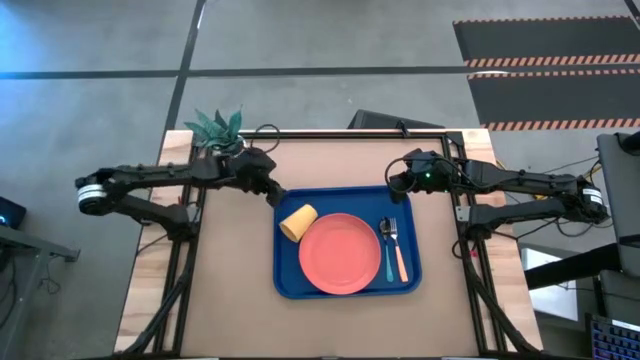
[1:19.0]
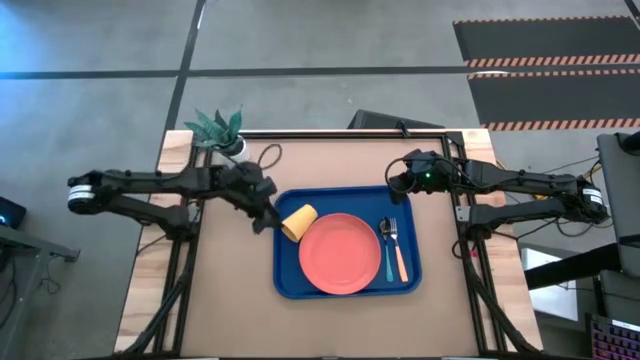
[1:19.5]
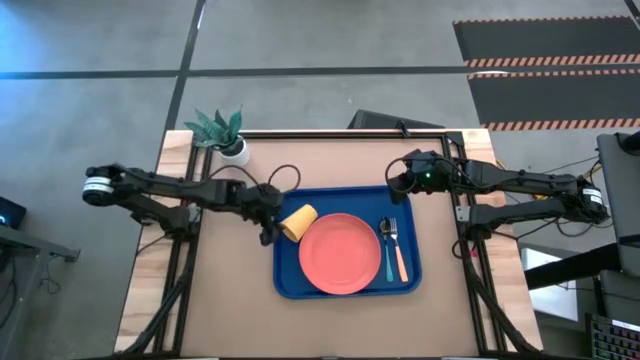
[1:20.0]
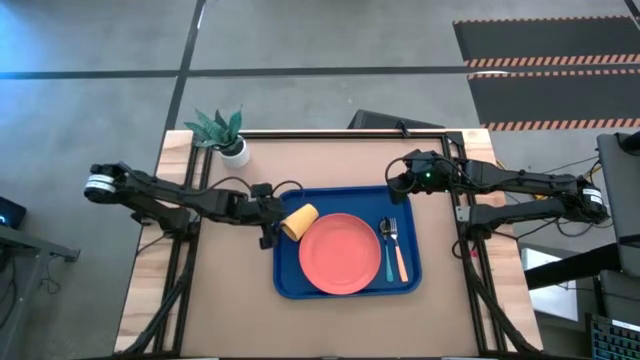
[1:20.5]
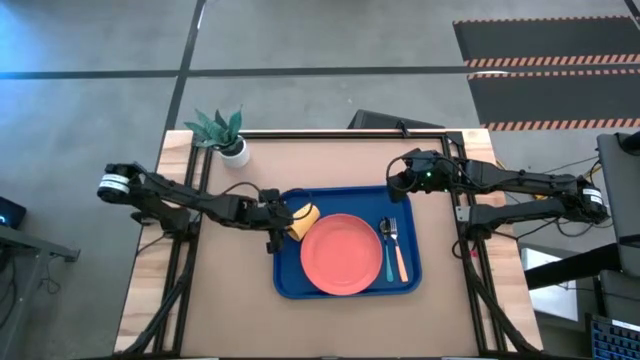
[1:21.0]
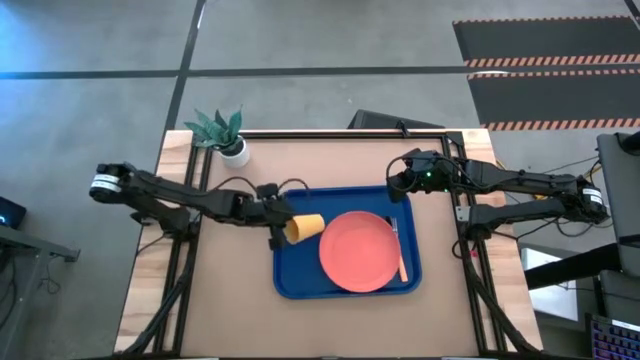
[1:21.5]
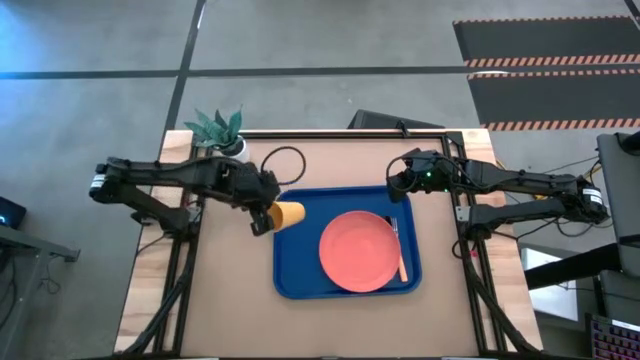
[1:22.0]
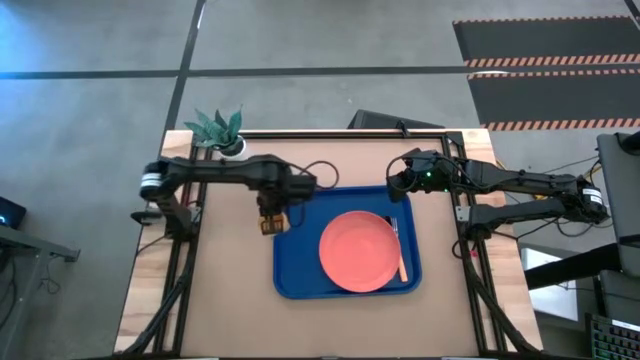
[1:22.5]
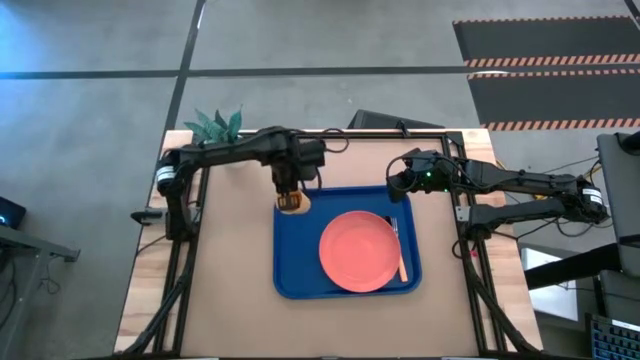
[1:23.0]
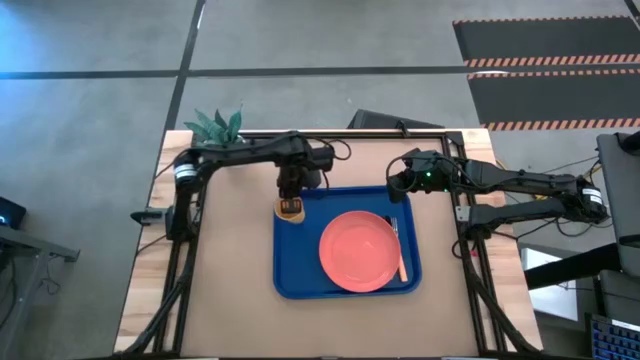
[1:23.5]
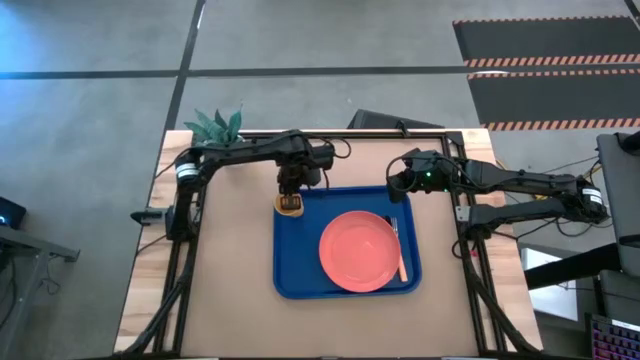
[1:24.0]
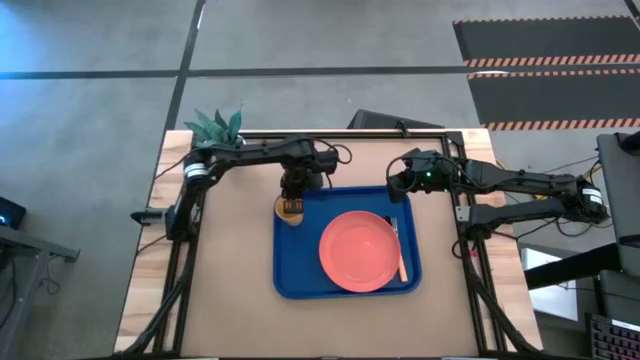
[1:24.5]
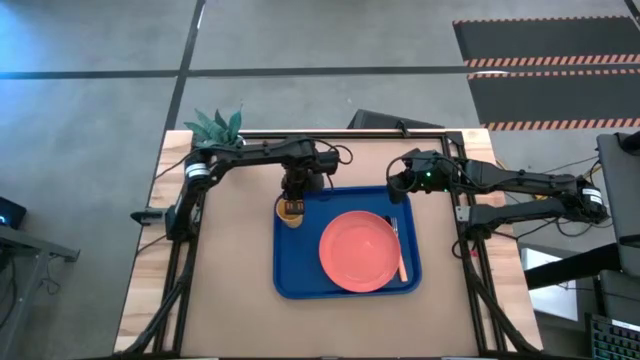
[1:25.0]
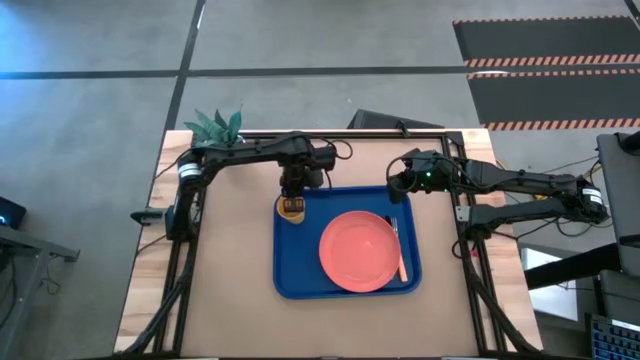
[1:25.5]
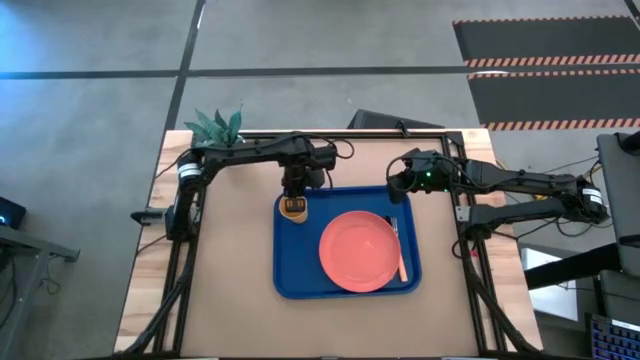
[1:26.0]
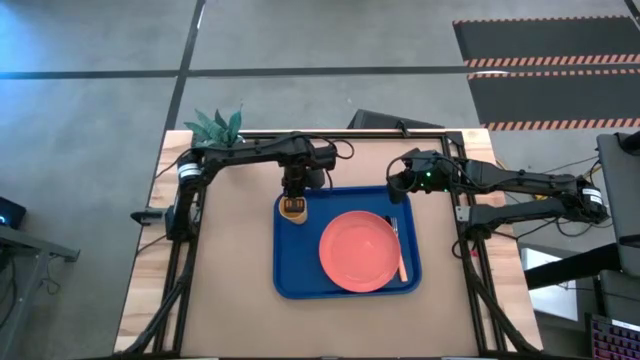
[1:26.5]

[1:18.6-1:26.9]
Task: Pick and place plate/cup/fork/spoon on tray
Adjust the yellow cup

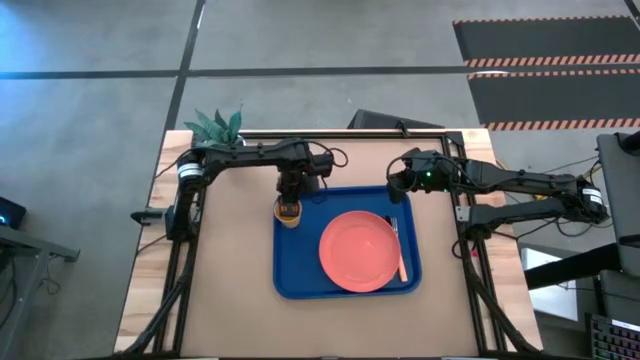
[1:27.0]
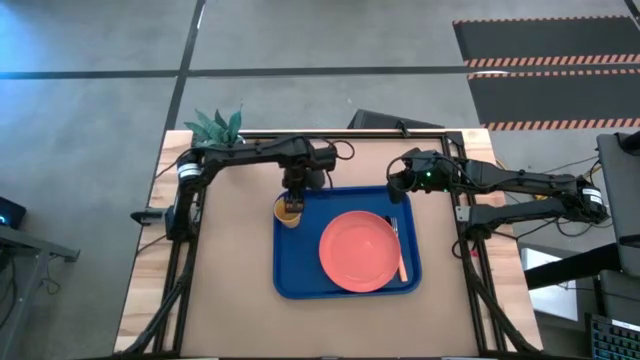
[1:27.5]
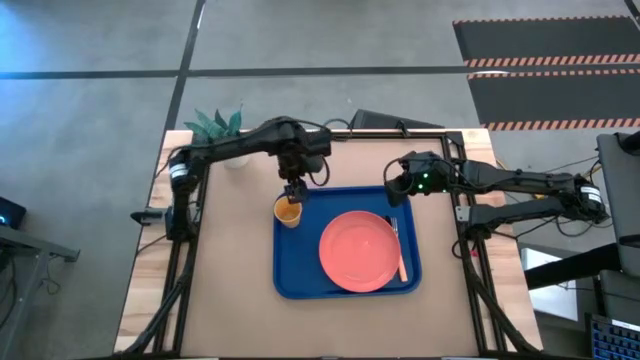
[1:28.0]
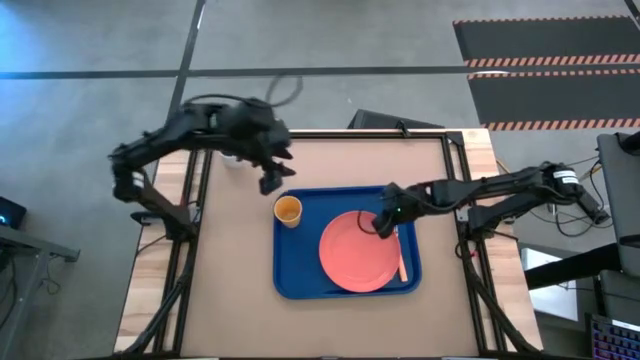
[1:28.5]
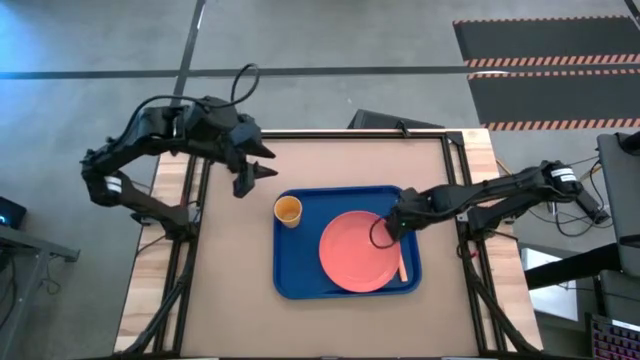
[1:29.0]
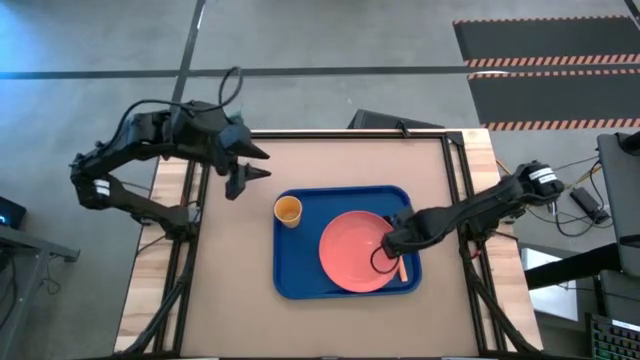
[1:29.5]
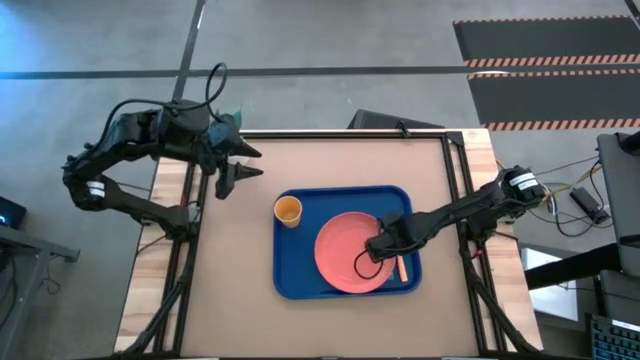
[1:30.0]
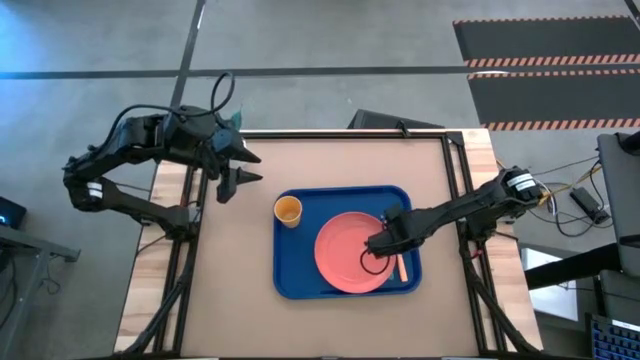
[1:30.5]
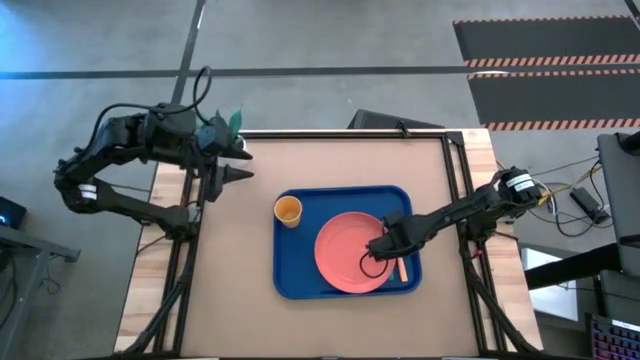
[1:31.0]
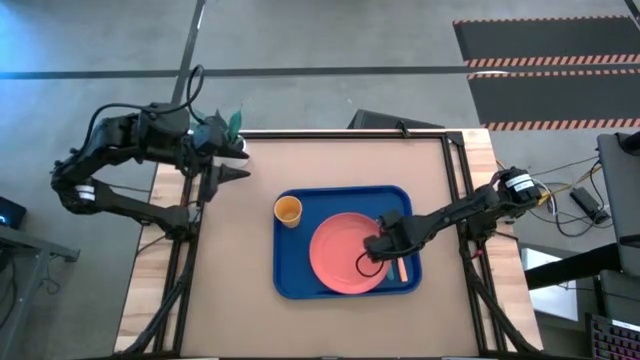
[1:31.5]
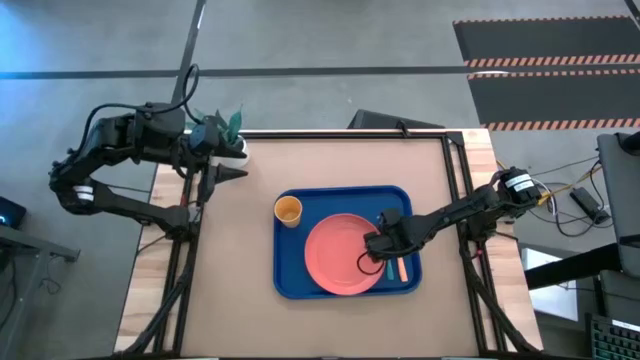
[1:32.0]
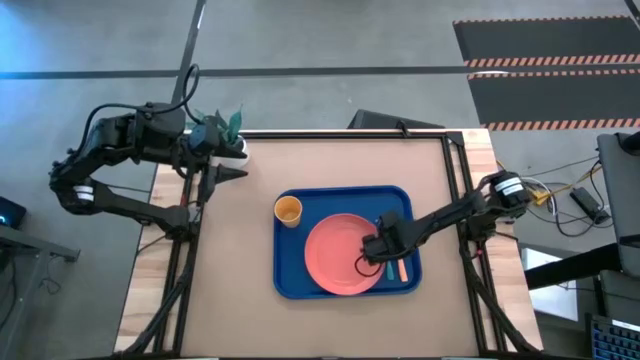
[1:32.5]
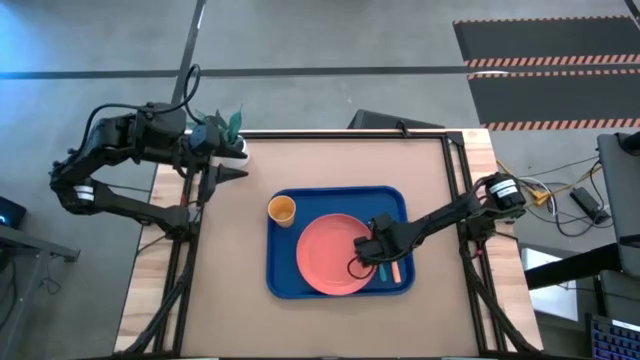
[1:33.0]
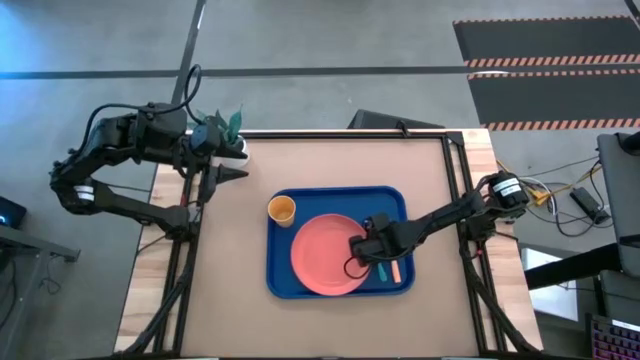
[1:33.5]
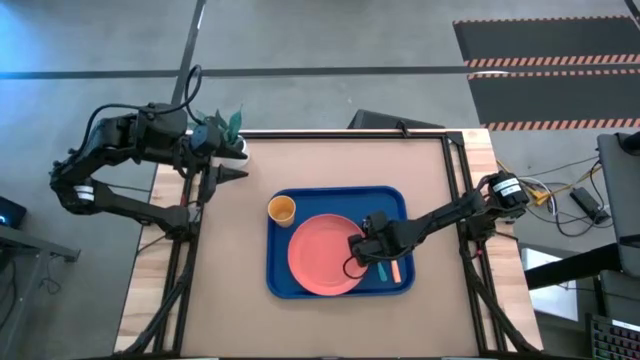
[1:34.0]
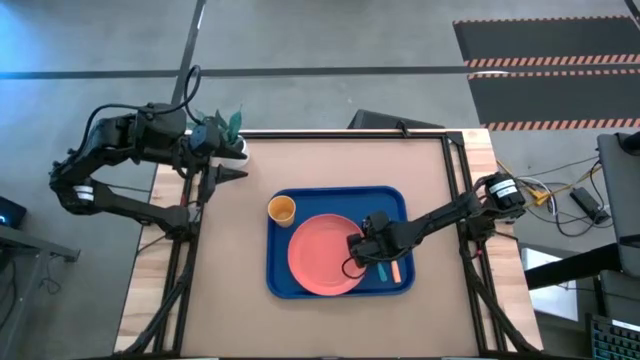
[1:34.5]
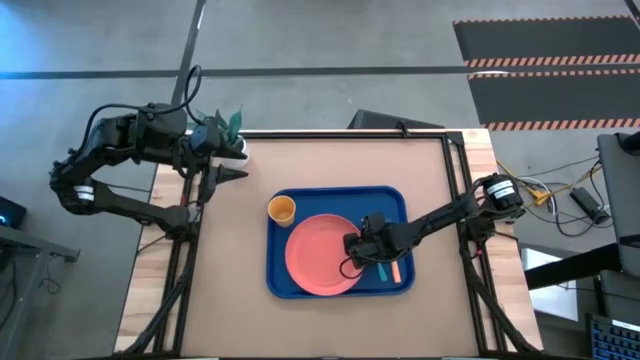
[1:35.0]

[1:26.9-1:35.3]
Adjust the pink plate

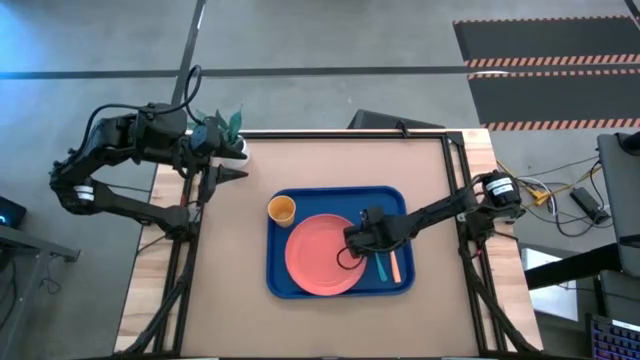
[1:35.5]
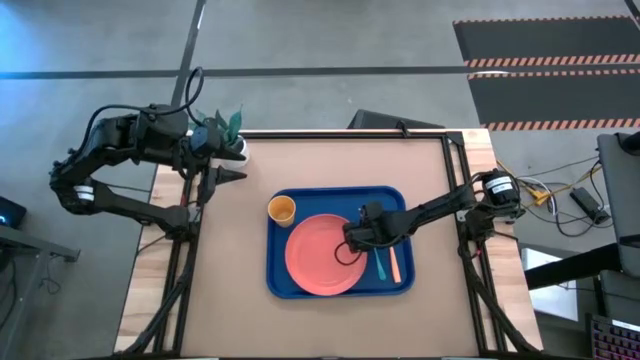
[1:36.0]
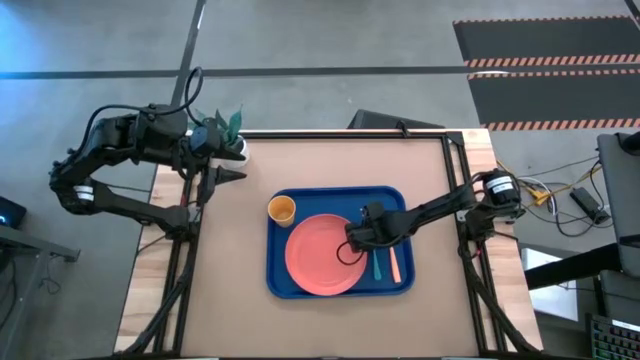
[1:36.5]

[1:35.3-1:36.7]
Adjust the blue spoon

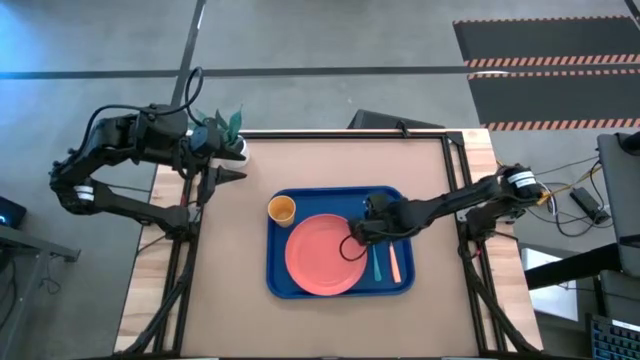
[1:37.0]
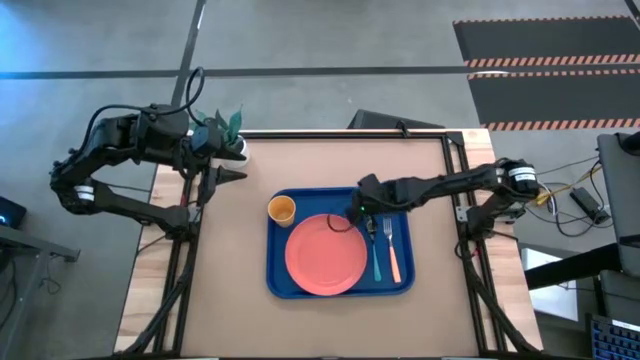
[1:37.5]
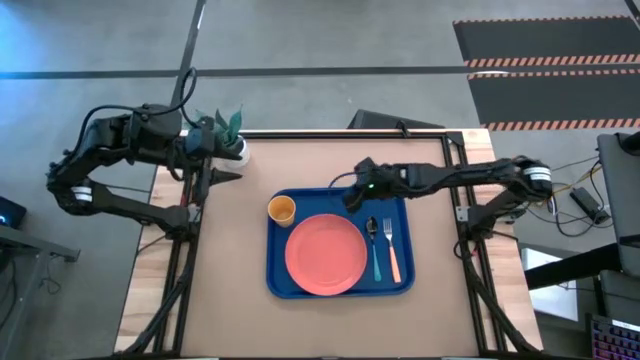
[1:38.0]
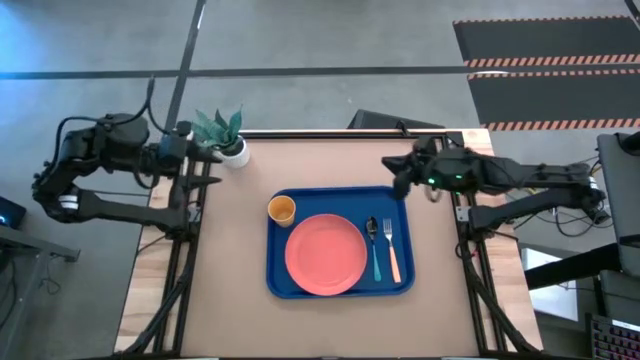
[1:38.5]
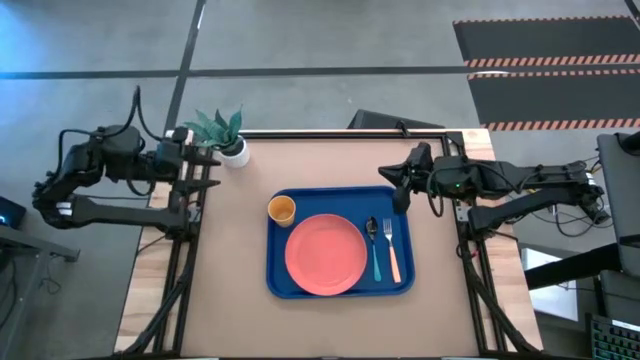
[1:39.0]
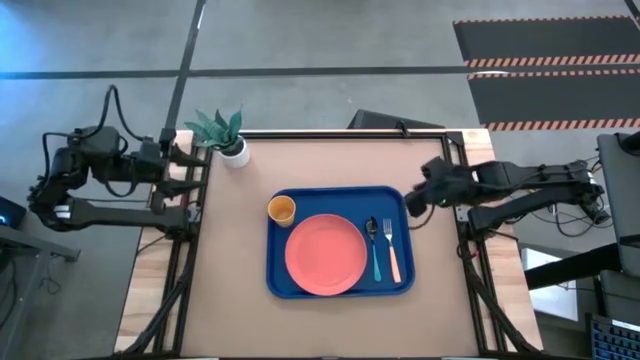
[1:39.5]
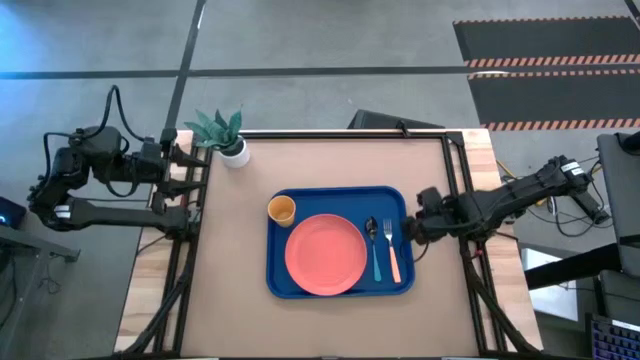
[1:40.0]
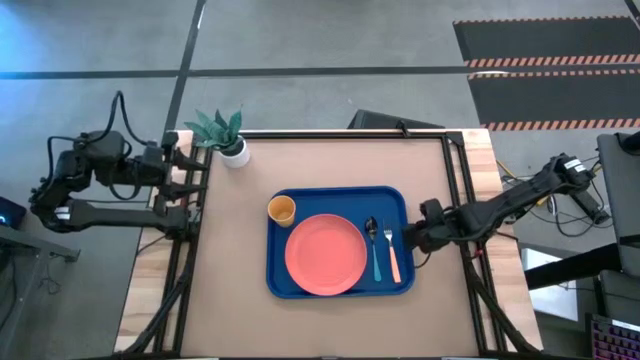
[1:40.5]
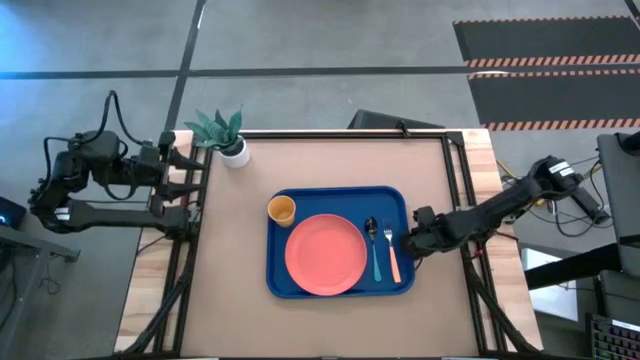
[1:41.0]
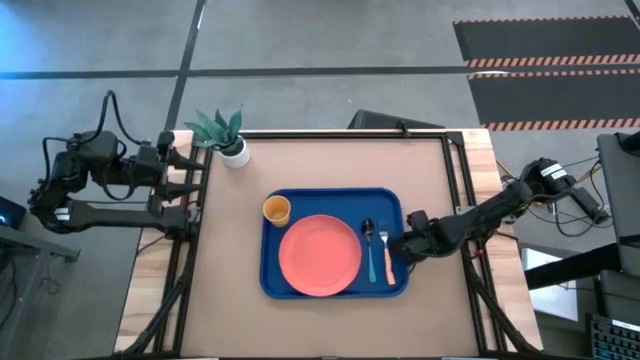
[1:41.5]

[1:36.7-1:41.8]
Adjust the blue tray
